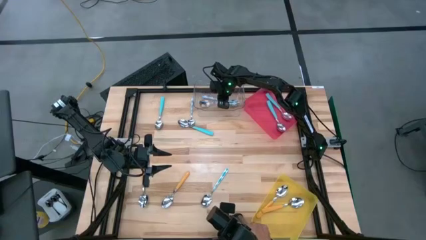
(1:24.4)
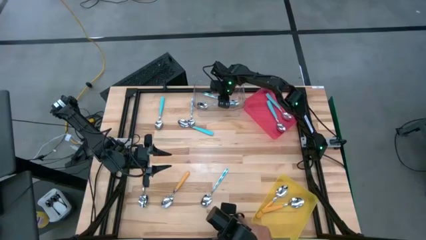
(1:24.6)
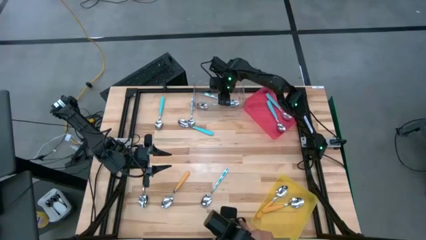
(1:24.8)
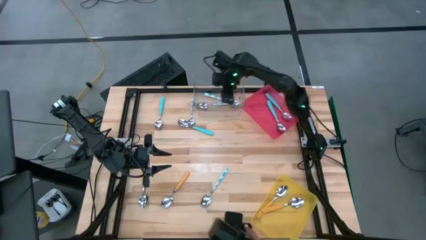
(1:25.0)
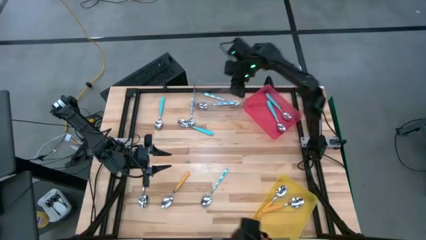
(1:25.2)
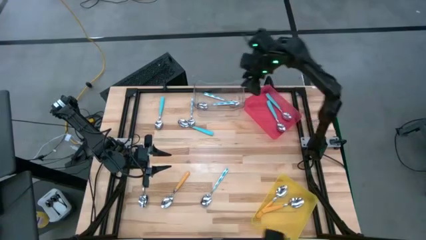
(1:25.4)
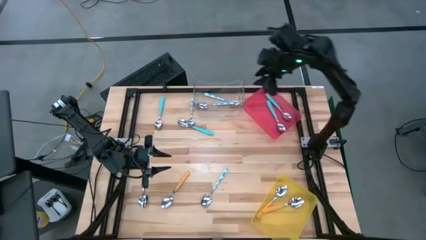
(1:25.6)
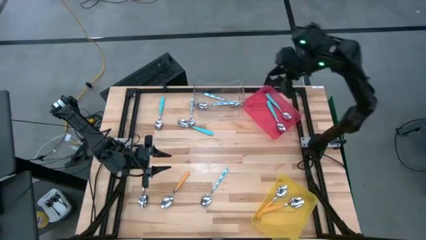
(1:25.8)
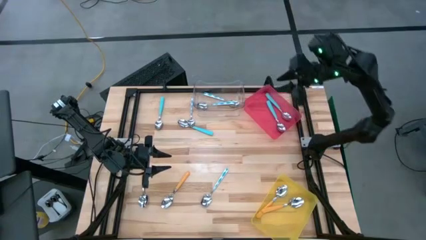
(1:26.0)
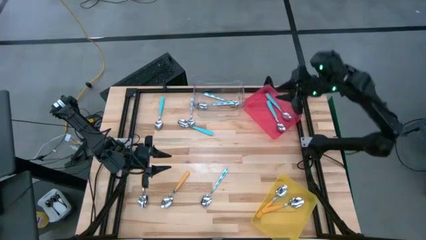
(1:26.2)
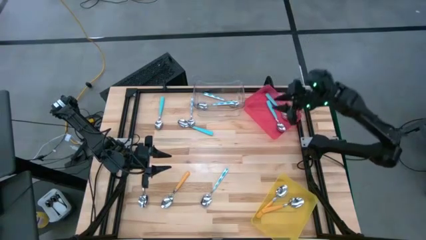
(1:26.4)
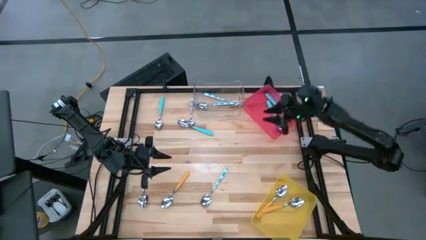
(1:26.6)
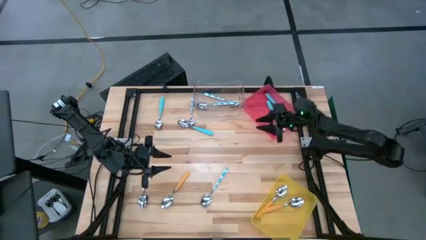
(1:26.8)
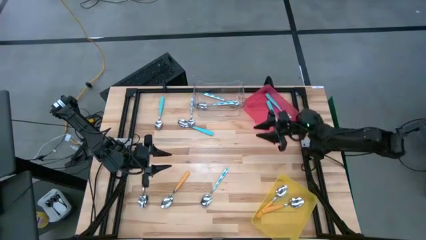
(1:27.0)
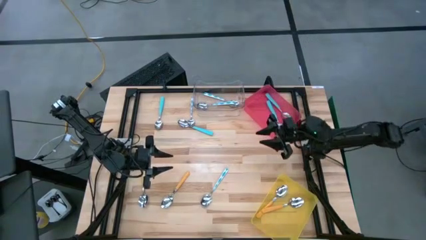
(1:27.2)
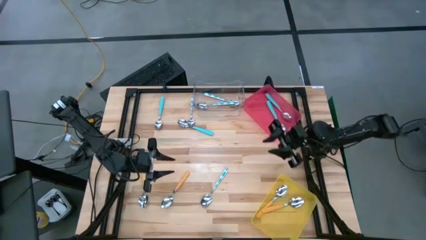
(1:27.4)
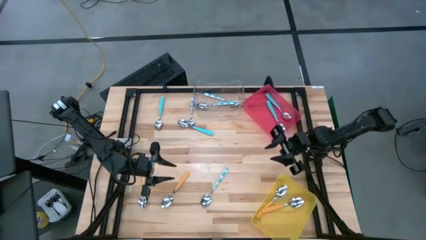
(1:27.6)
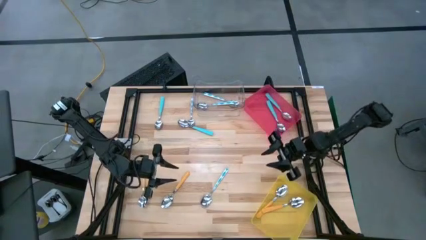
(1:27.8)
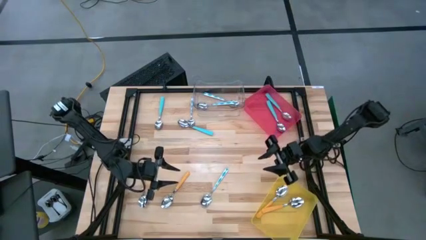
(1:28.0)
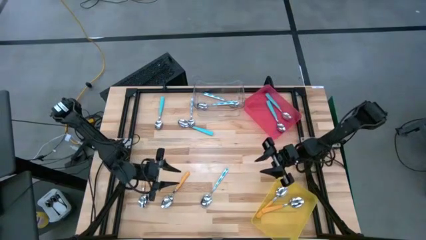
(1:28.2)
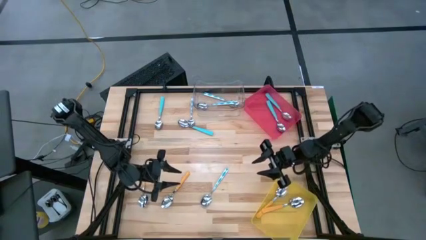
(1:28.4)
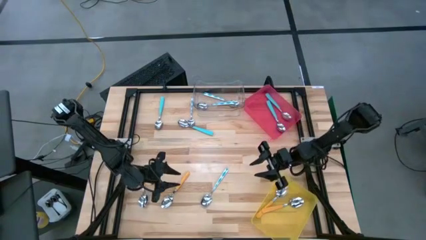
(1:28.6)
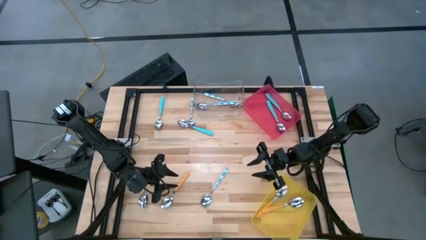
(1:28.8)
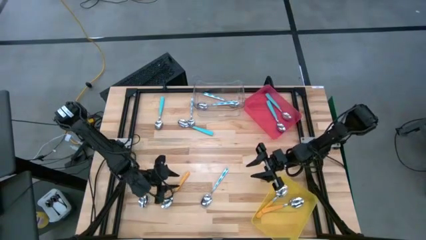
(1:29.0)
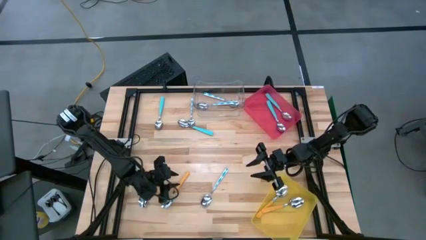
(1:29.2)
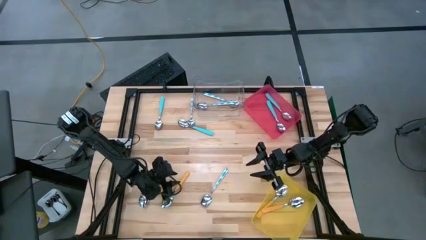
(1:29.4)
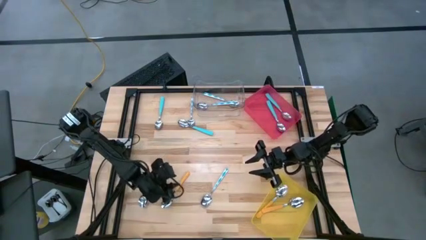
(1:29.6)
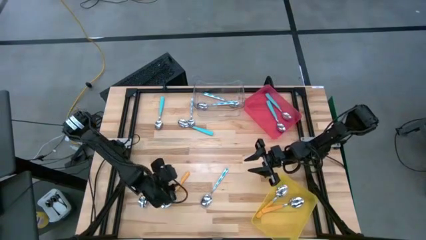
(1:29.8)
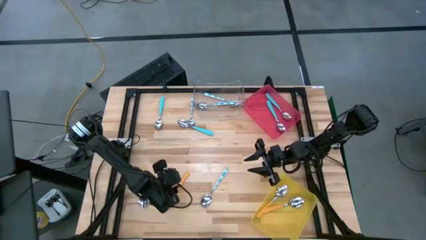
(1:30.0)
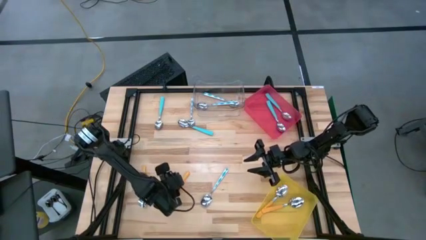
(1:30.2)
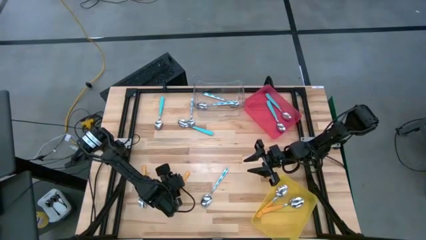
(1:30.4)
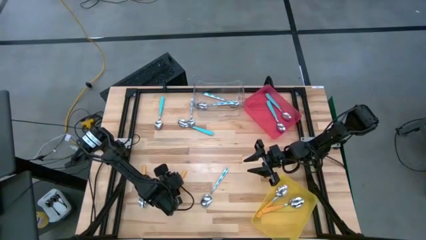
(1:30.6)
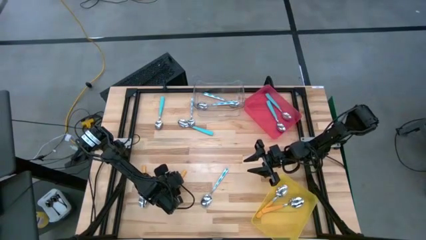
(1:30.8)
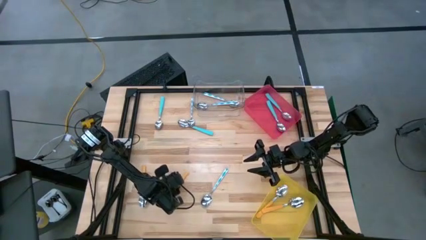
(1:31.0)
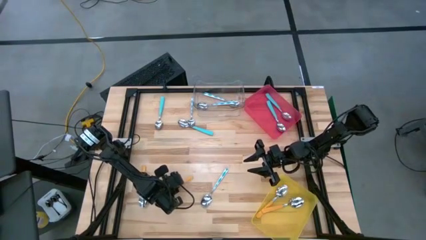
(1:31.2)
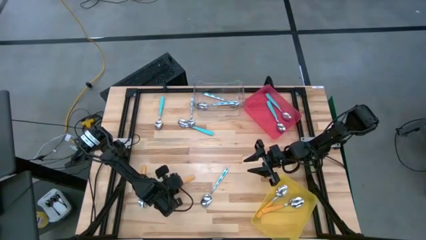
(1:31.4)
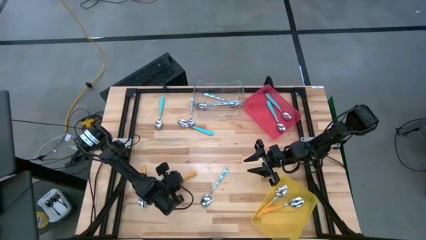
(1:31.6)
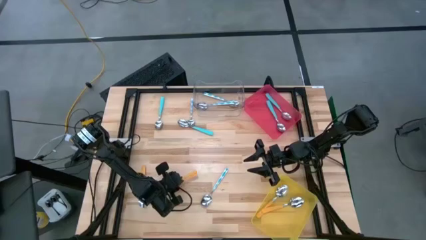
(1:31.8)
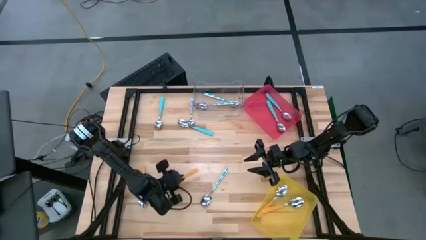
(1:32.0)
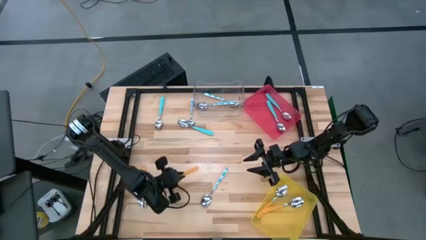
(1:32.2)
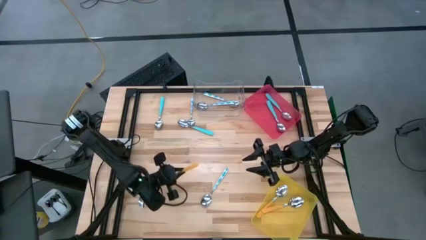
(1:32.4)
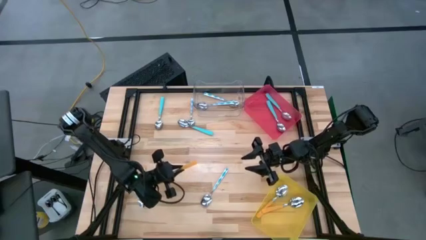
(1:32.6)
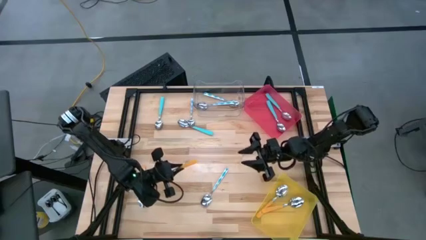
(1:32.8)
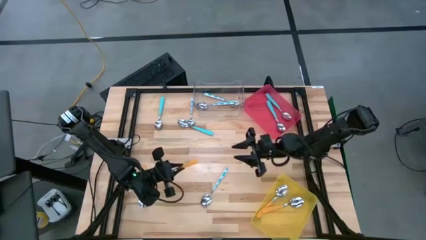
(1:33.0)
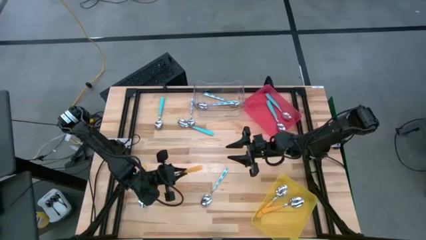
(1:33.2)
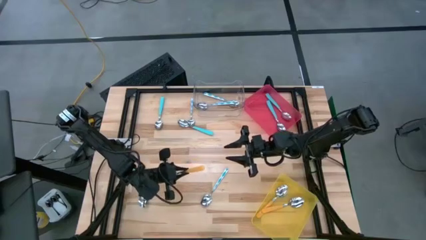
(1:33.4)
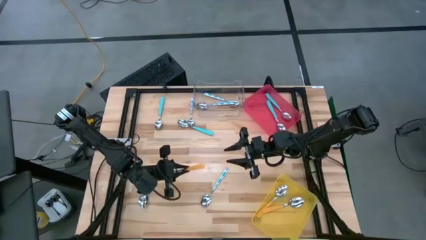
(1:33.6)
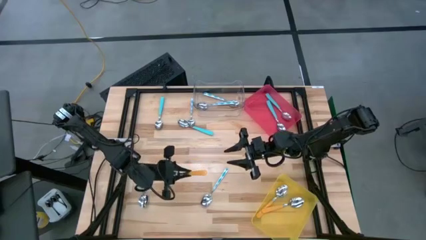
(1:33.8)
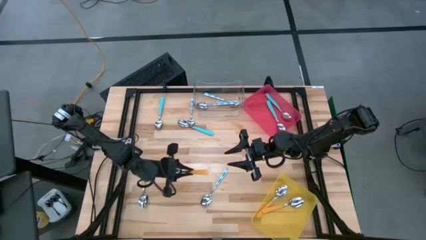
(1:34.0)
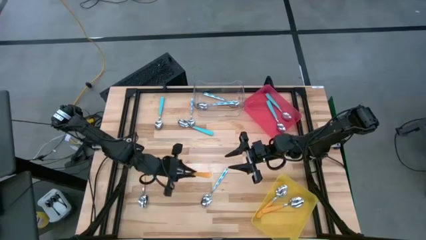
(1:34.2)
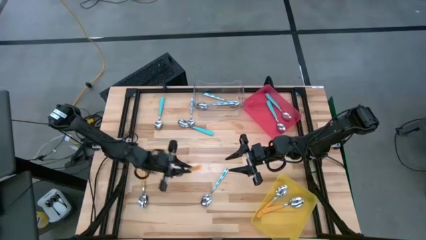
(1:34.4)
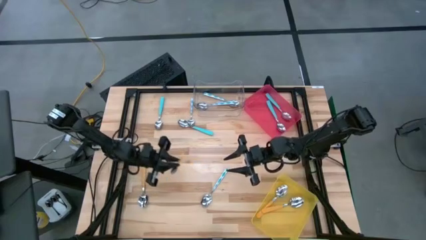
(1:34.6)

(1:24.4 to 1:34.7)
Task: Sort silverware by color (type)
Put the orange spoon into the yellow bin

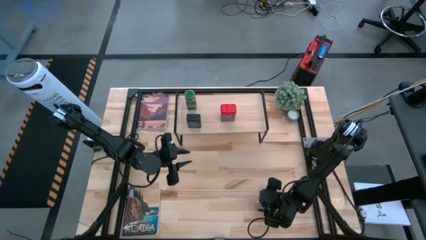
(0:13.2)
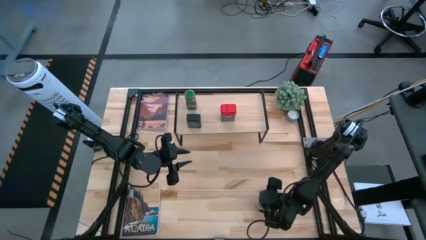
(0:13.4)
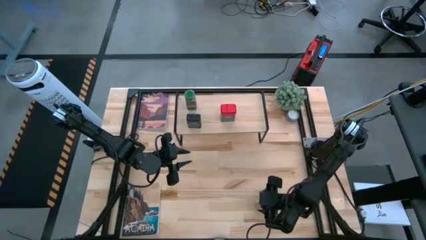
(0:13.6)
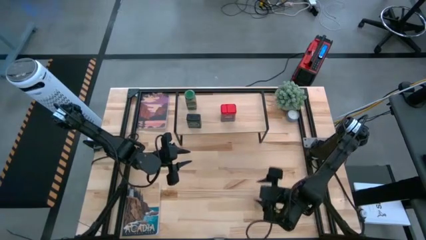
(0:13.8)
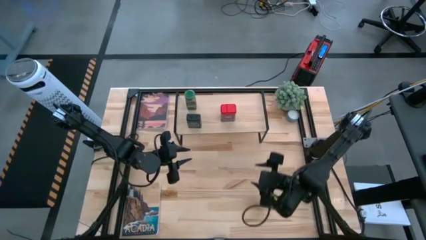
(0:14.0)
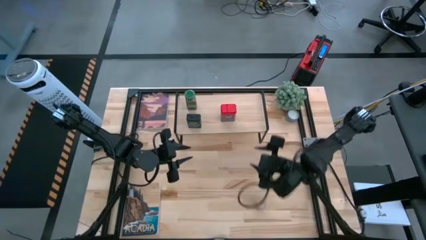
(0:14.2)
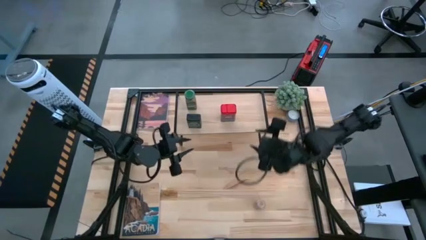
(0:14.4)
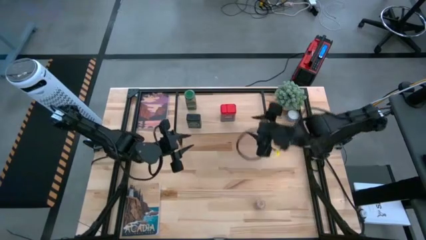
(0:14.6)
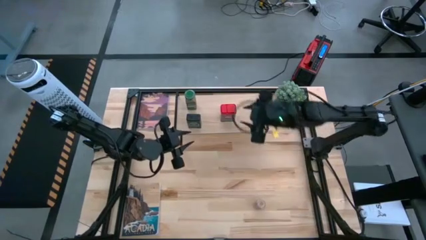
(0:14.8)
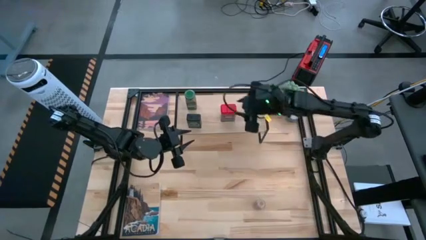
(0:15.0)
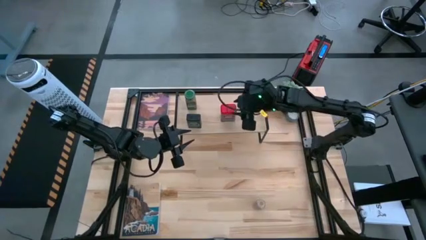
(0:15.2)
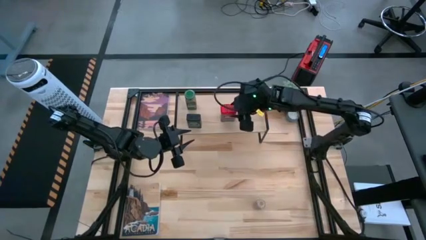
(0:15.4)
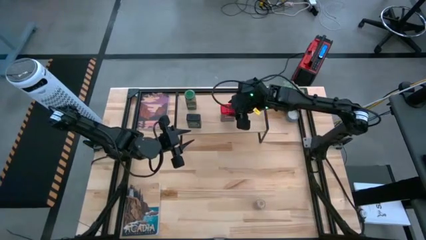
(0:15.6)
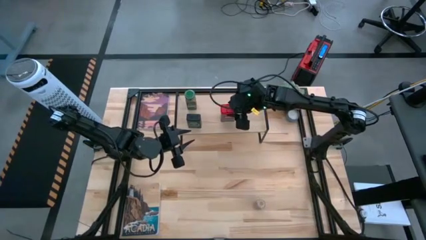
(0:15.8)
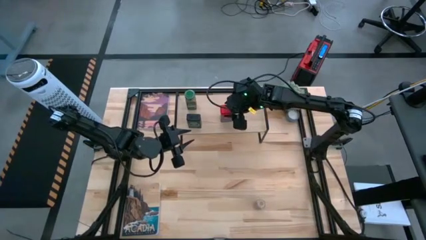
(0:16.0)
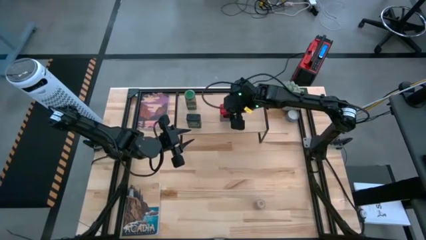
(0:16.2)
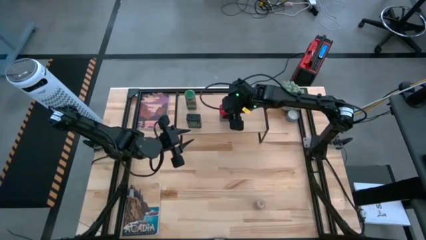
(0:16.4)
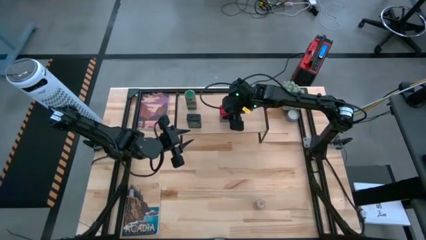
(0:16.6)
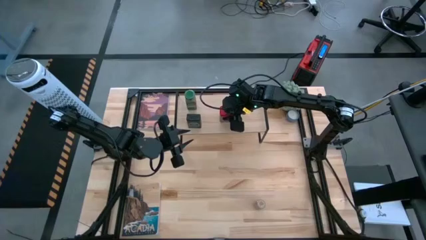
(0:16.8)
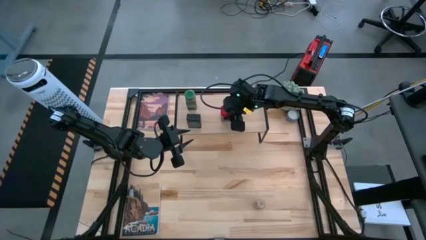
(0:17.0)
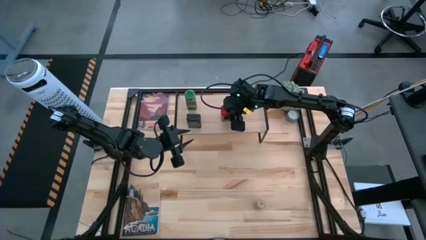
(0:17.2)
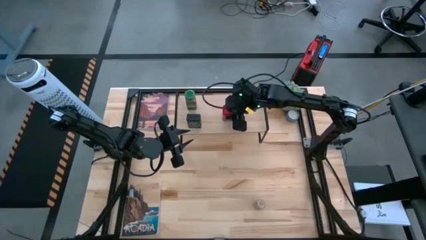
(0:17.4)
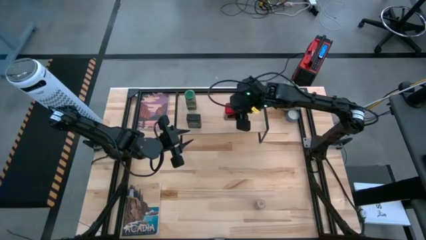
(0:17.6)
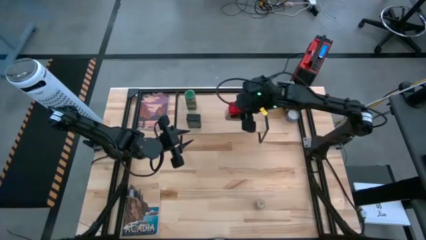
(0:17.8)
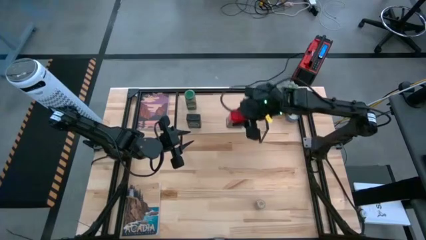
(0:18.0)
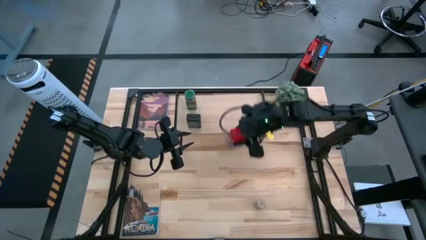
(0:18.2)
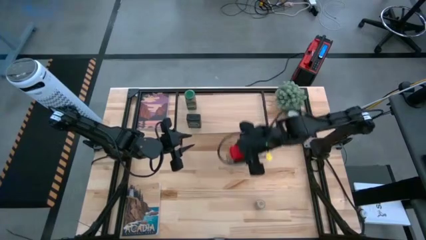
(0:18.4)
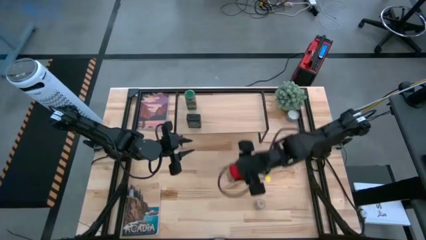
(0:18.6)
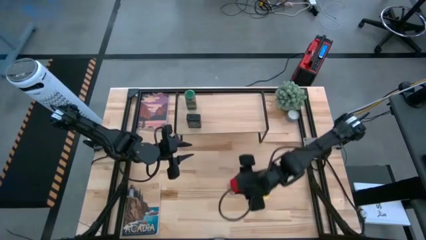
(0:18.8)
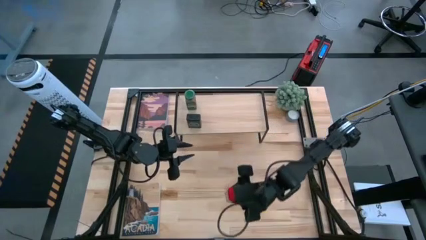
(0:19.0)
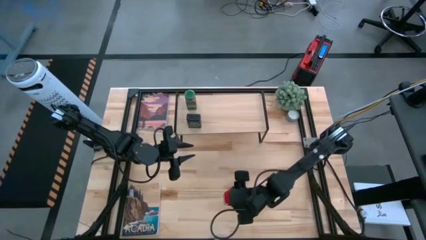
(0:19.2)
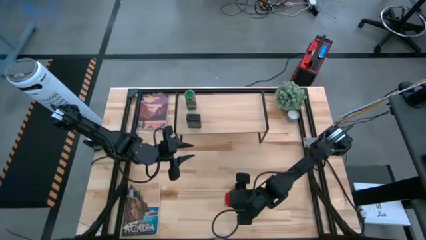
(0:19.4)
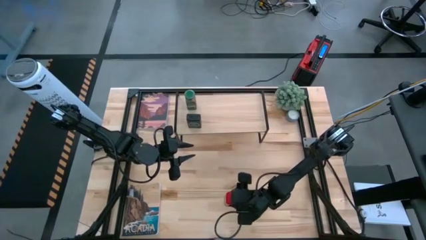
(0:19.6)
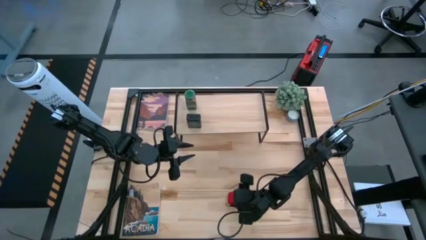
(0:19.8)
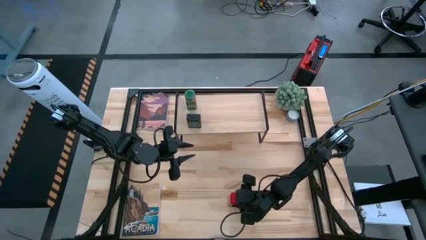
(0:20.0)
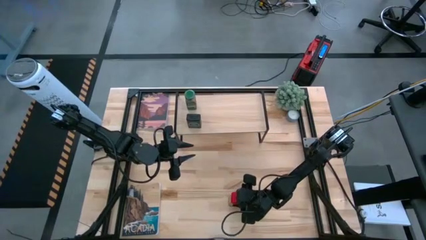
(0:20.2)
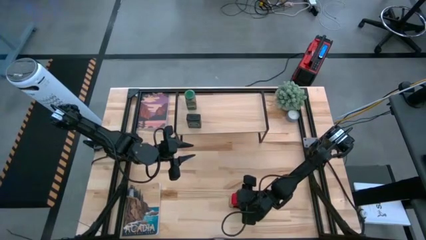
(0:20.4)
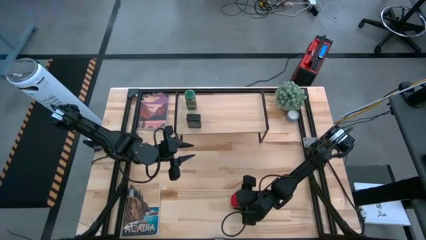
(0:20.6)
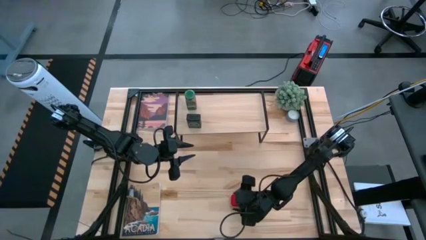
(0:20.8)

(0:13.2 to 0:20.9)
Task: Shelf spices
Remove the red seasoning can from the shelf
